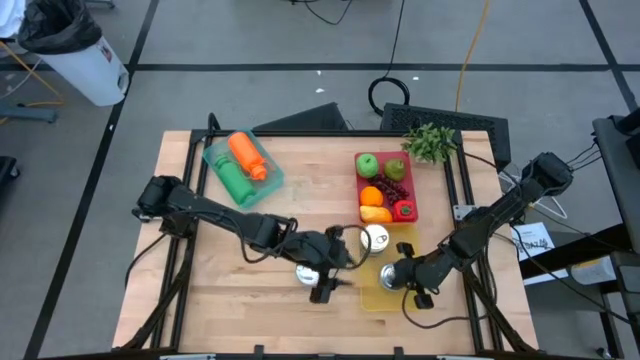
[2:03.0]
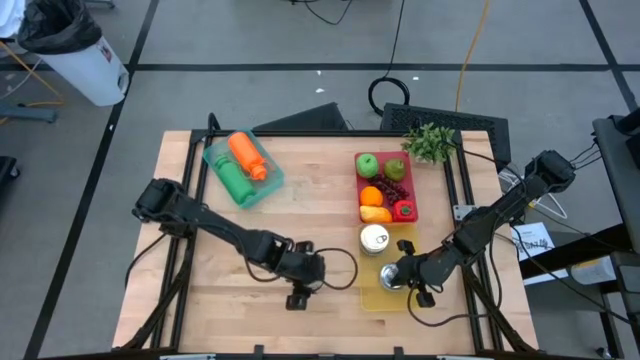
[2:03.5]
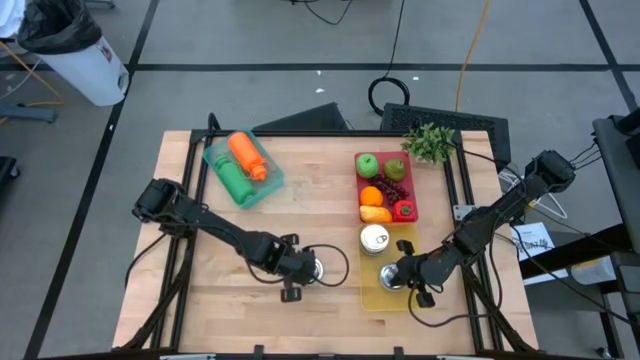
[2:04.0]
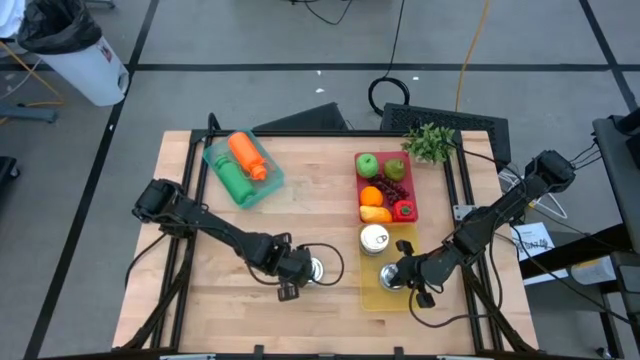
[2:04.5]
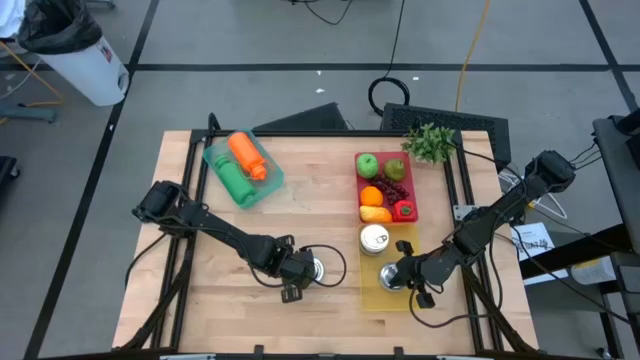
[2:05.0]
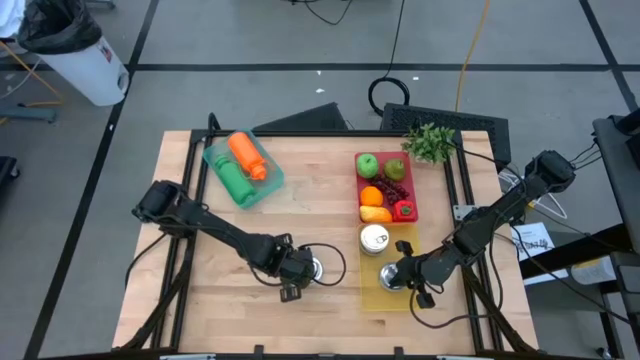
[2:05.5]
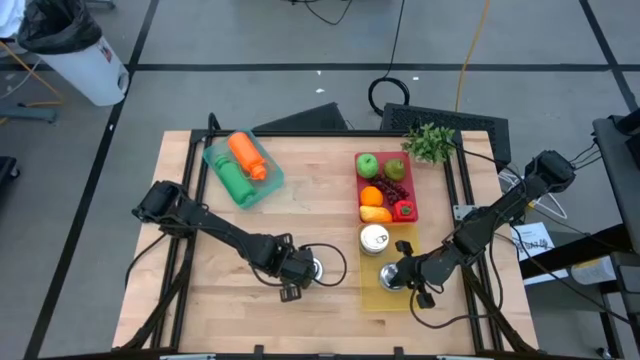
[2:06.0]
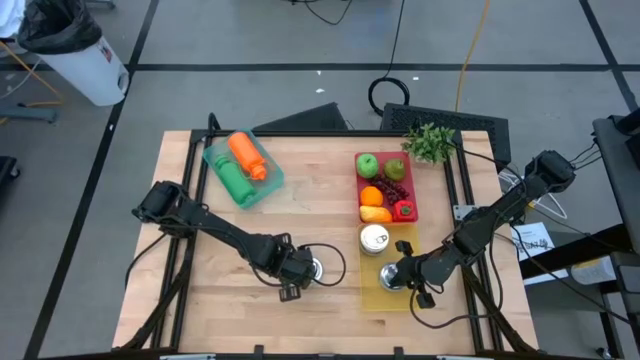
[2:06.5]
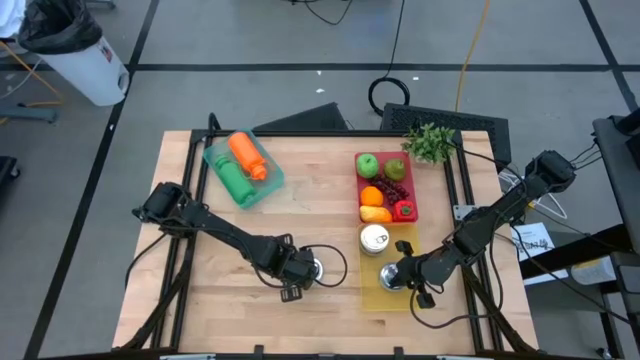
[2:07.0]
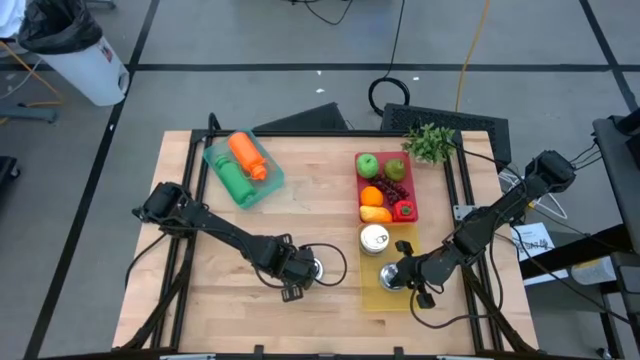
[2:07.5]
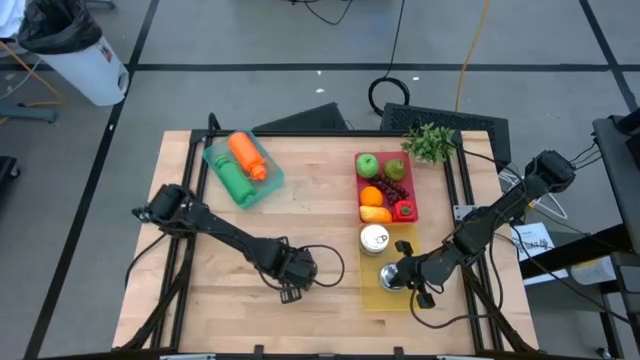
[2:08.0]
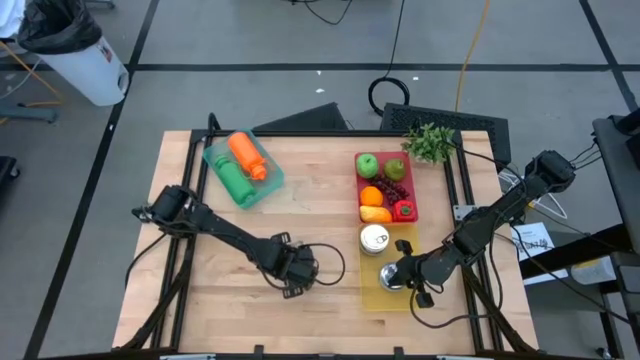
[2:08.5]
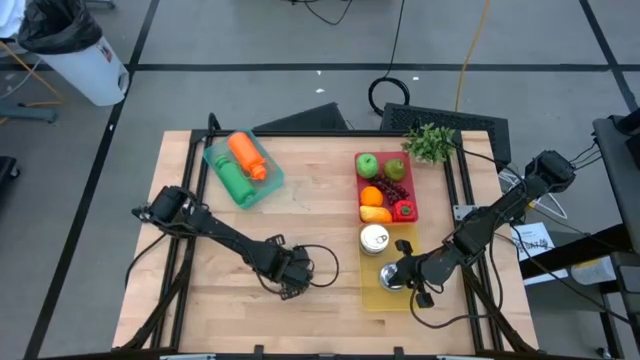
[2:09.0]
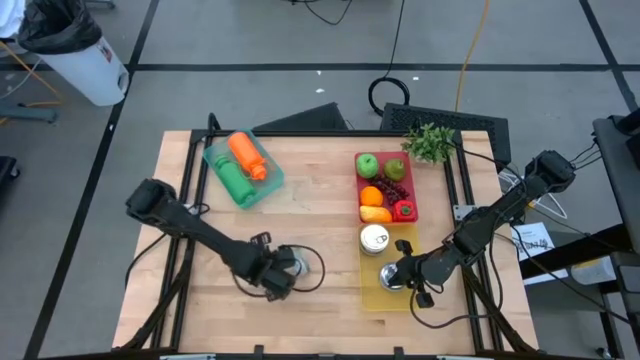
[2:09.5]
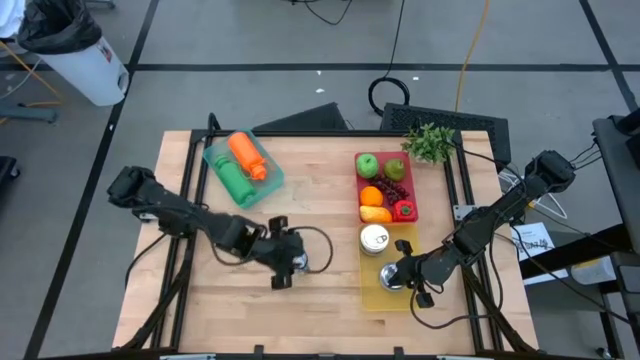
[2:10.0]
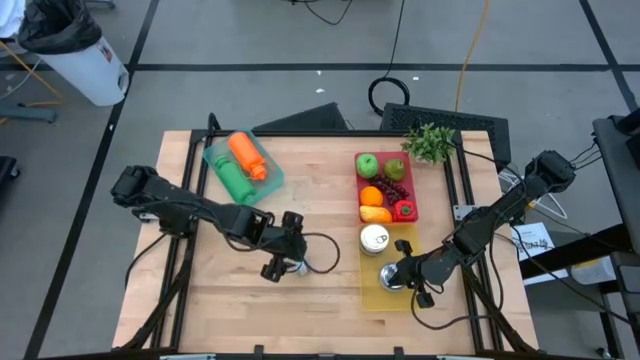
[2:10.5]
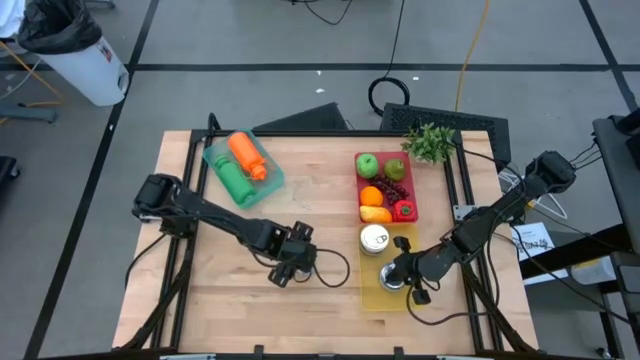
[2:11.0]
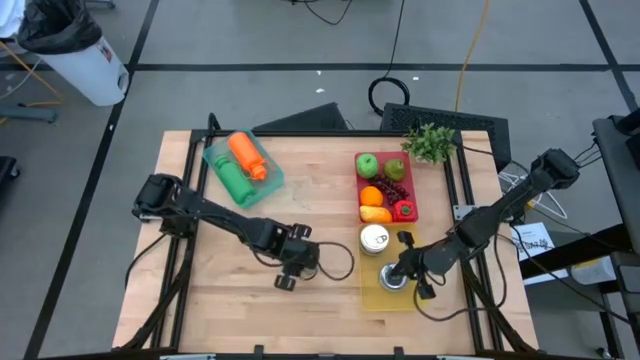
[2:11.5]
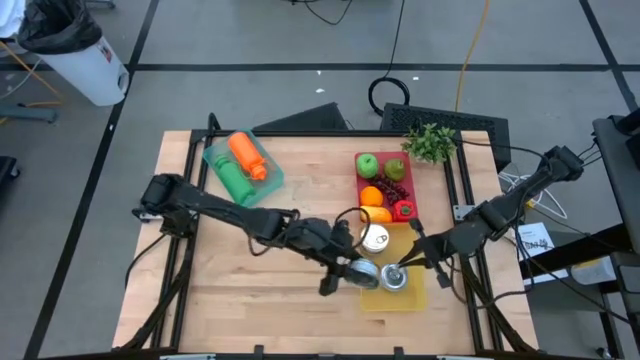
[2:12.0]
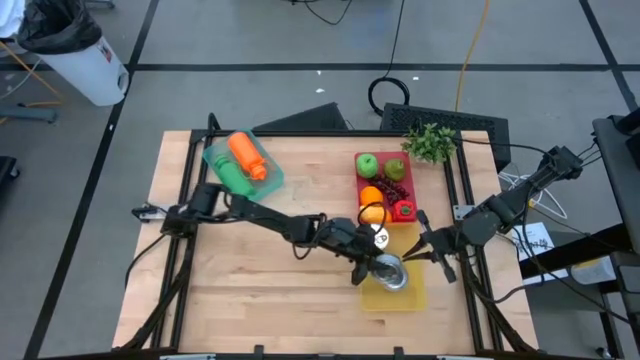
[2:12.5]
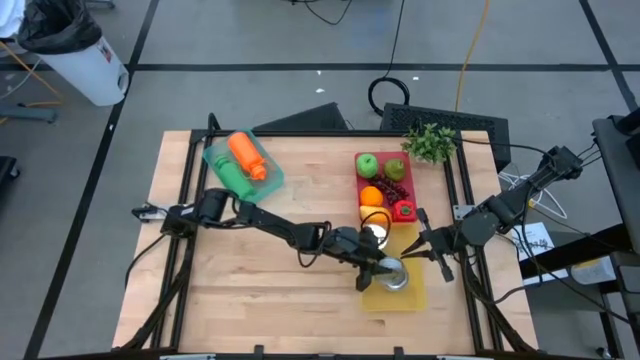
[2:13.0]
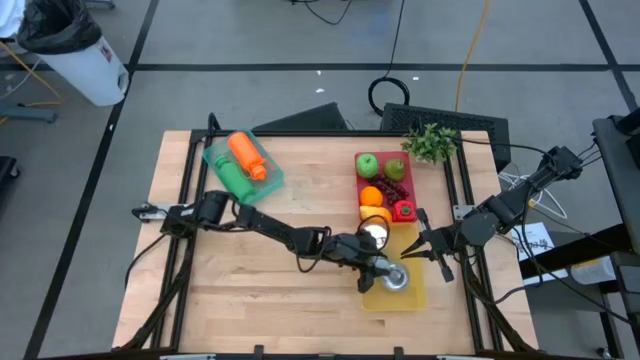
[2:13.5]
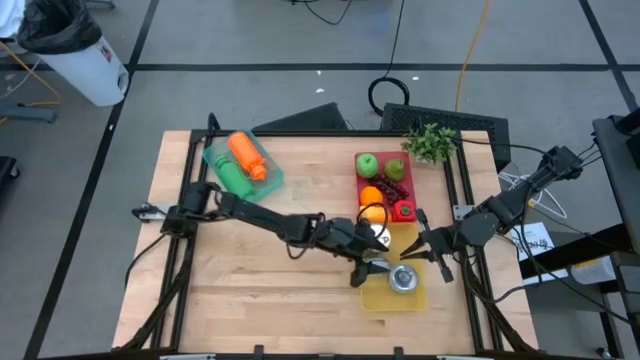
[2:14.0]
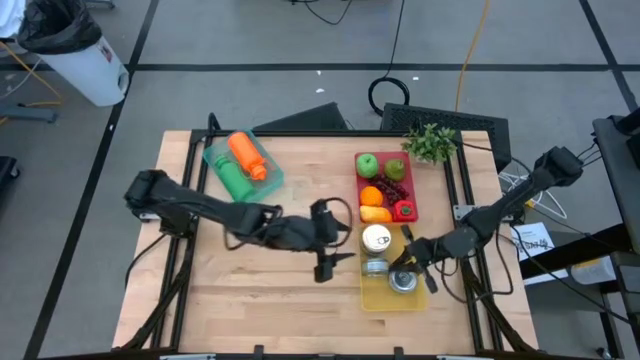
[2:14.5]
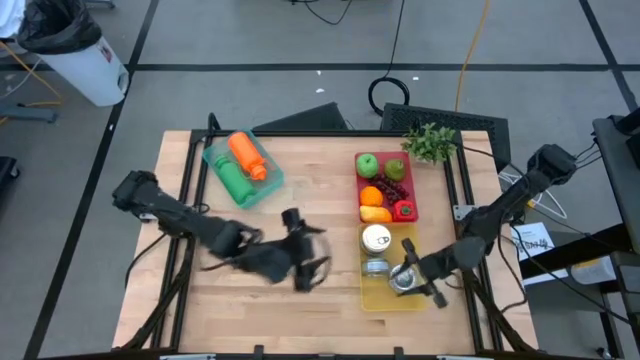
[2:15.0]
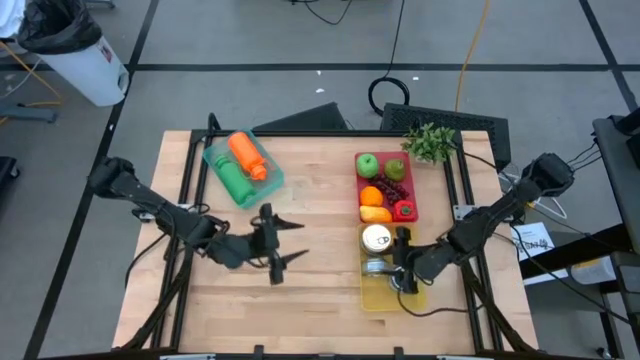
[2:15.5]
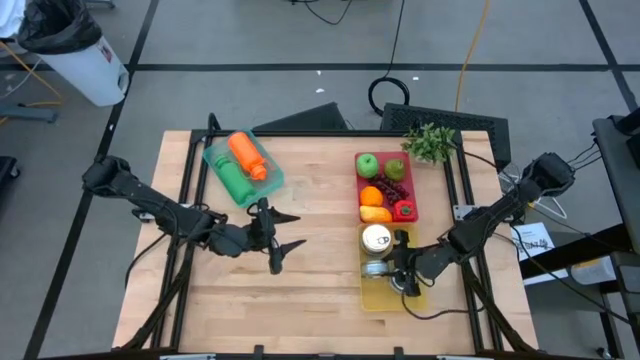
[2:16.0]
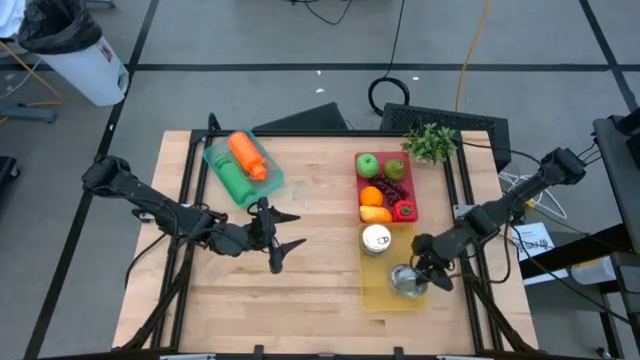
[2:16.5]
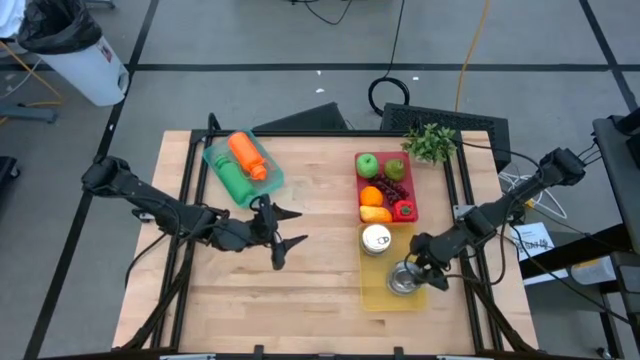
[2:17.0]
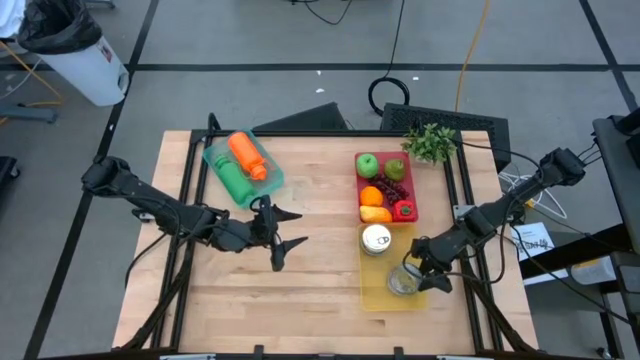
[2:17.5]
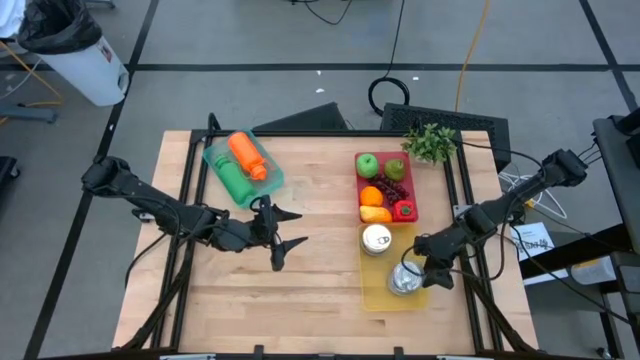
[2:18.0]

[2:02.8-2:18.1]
Task: Pick & Place Food Item
Put the green tuna can into the yellow bin

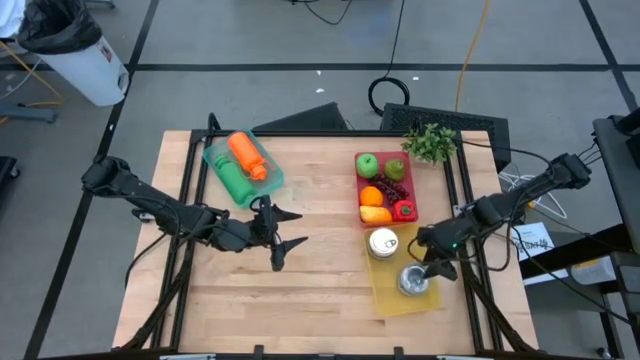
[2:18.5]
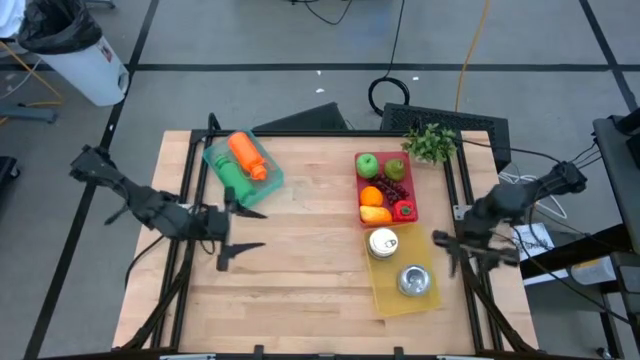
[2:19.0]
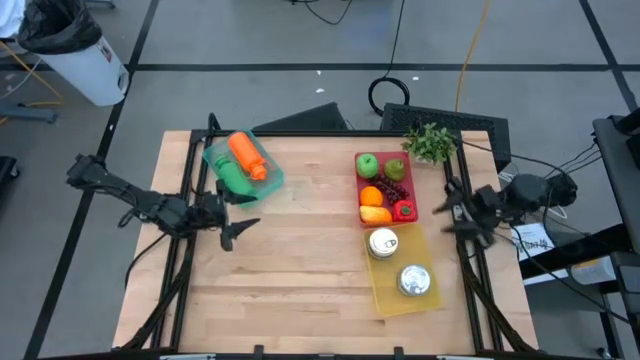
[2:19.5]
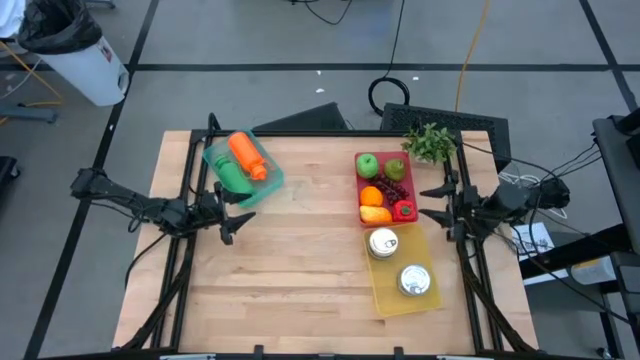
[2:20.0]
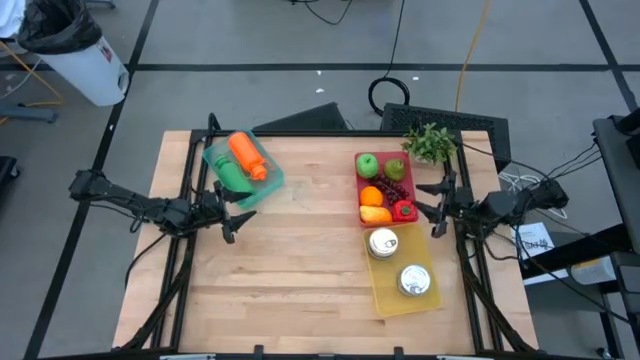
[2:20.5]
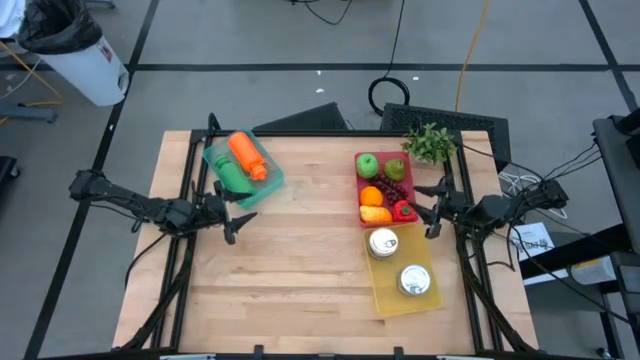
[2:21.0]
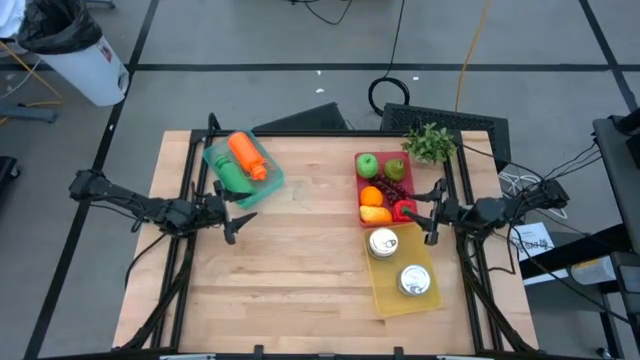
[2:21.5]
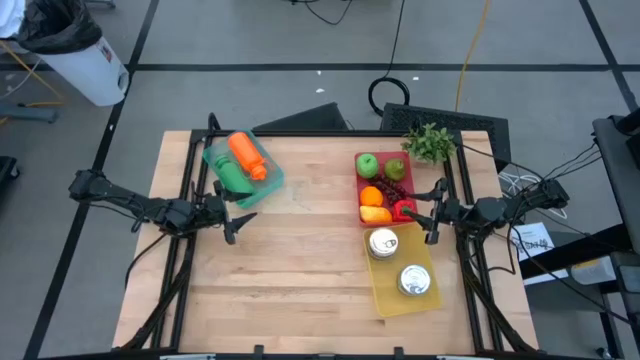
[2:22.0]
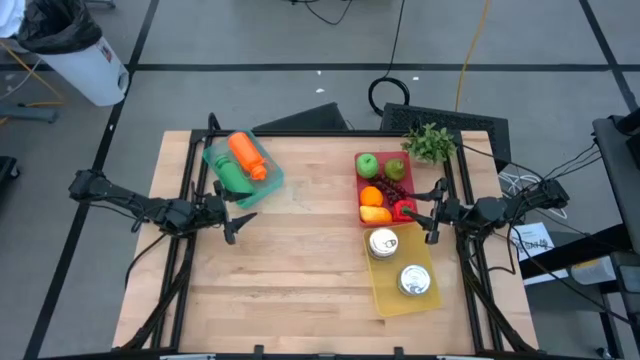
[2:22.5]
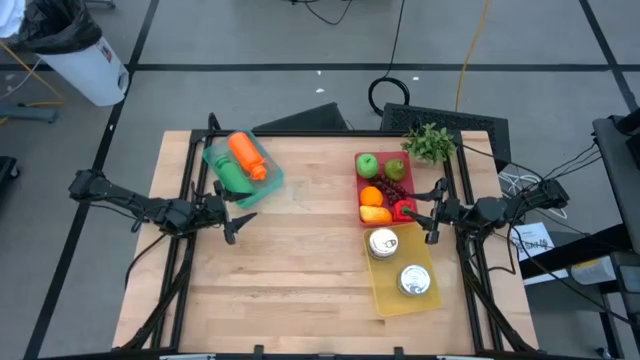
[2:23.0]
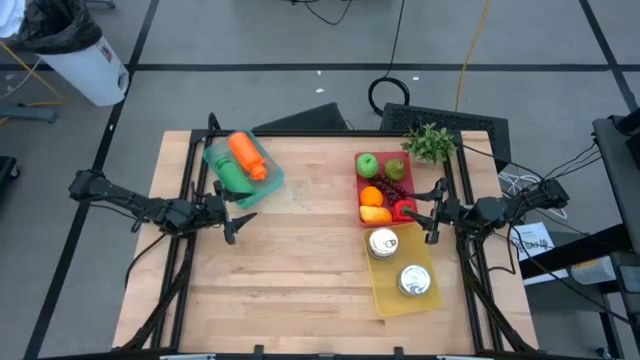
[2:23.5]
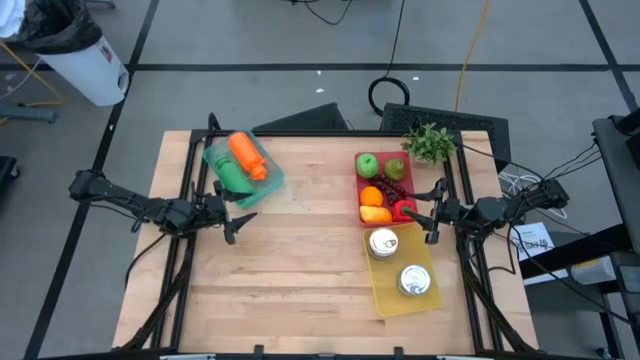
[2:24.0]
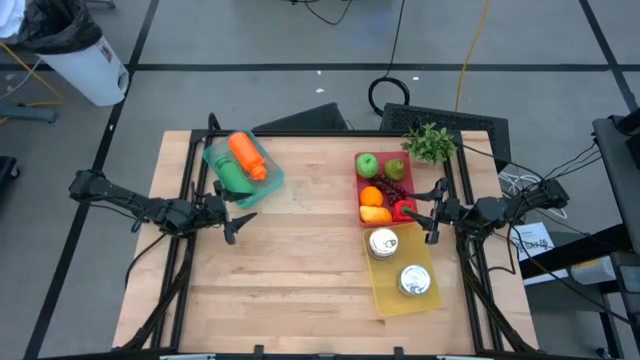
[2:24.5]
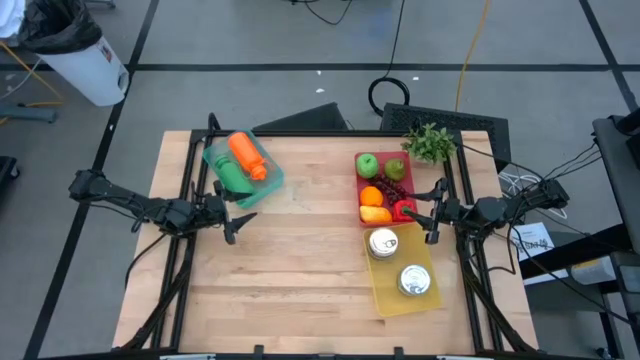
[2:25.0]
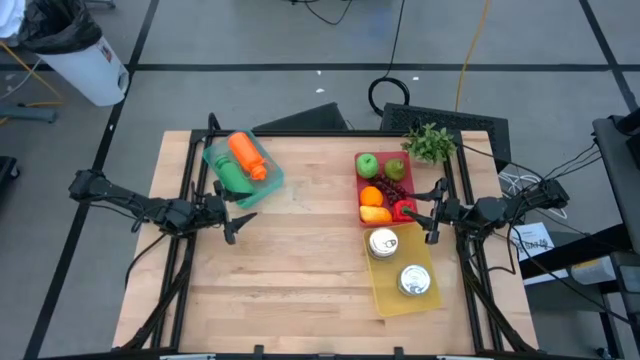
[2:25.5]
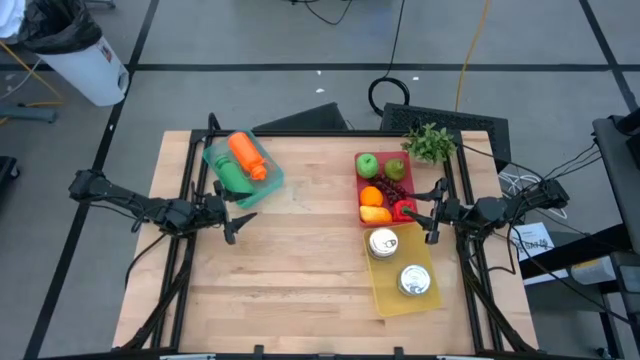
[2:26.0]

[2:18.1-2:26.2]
Return to Home Position
